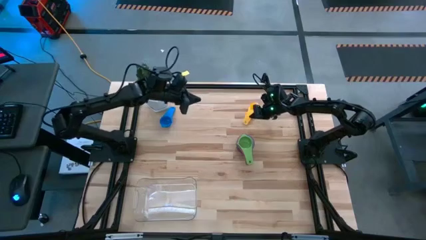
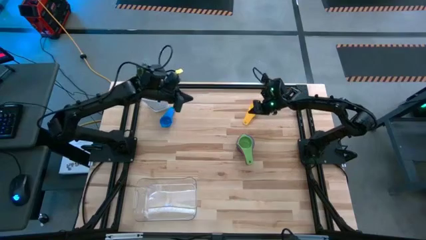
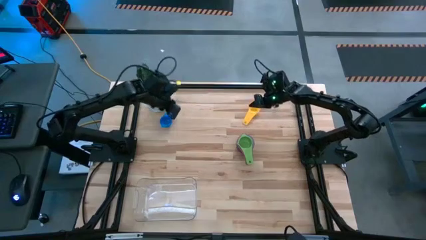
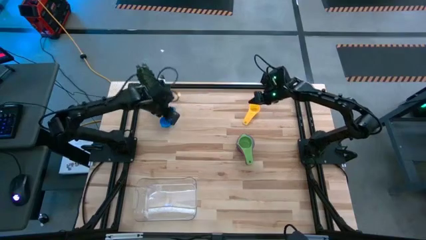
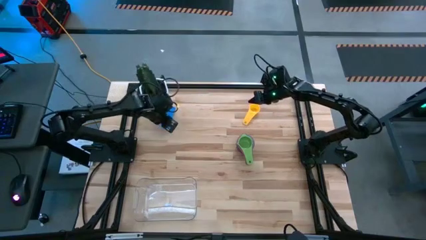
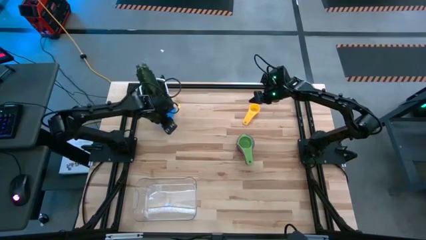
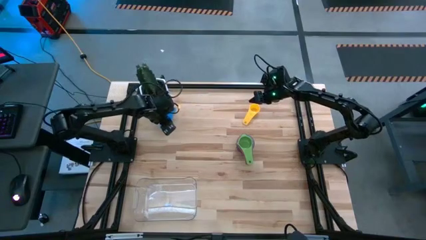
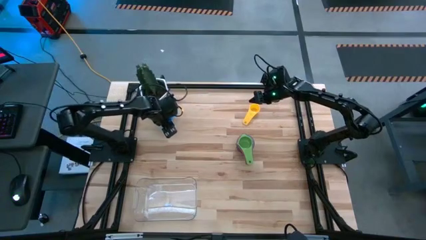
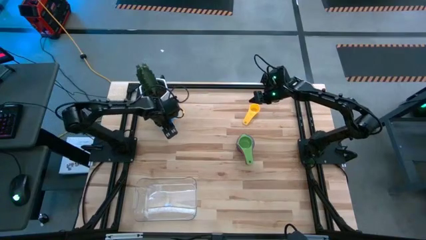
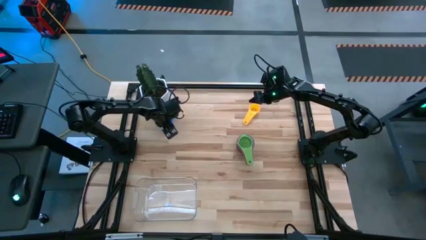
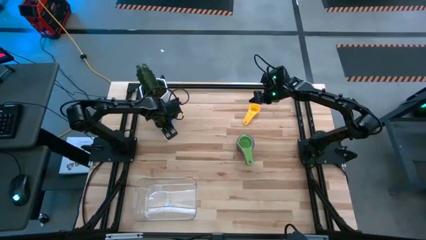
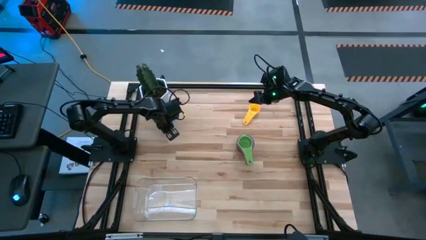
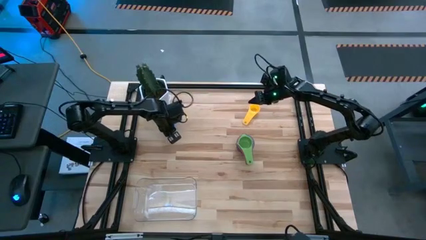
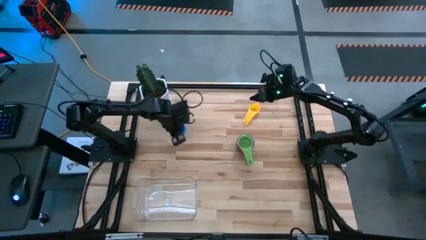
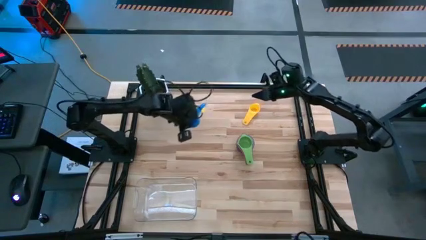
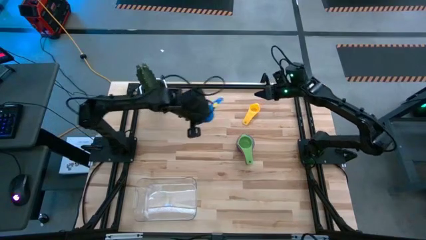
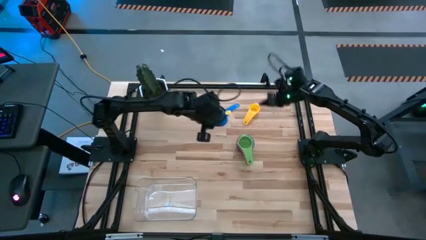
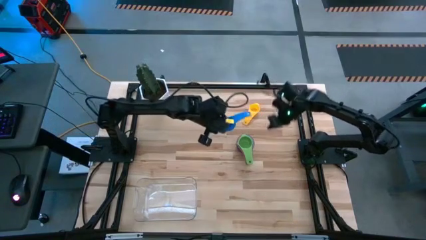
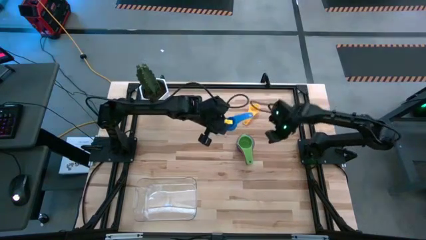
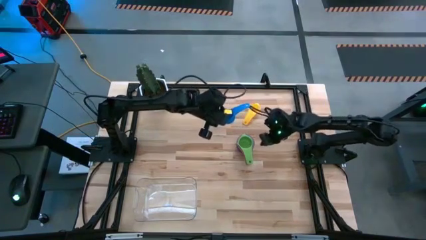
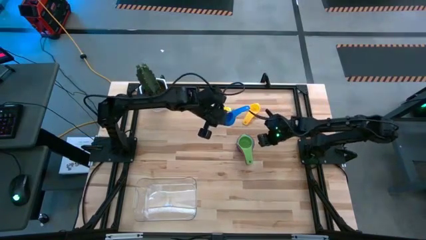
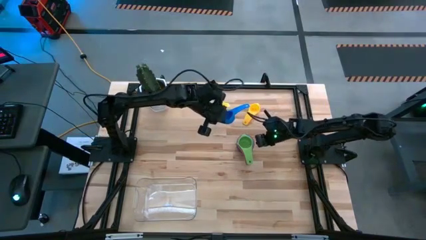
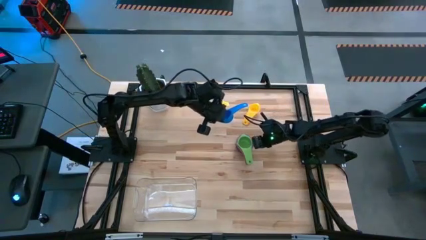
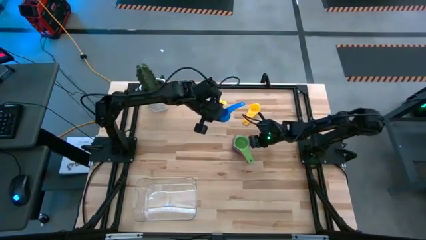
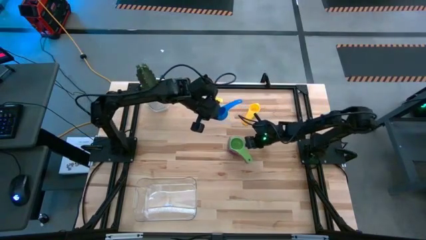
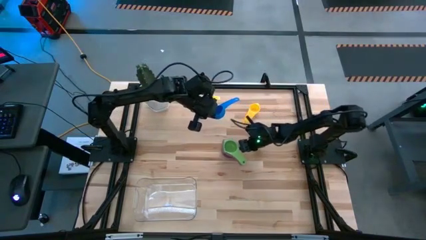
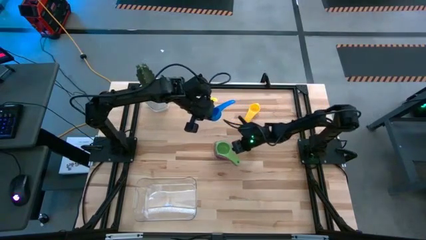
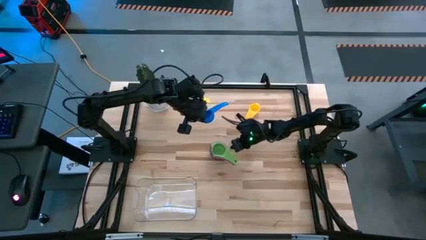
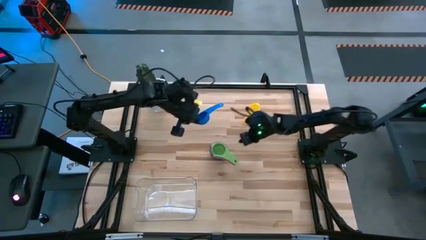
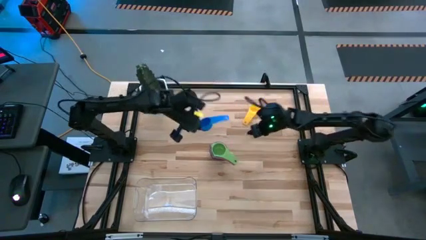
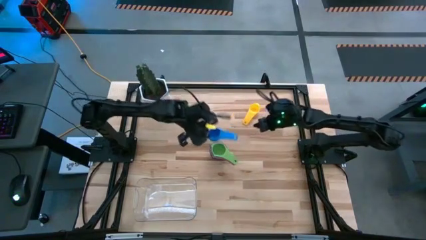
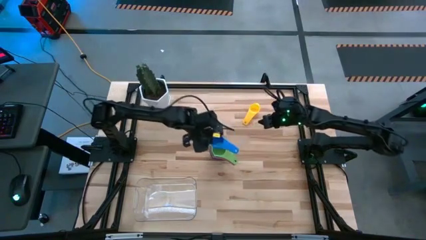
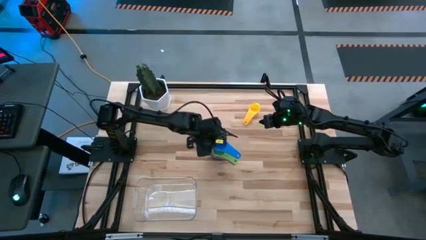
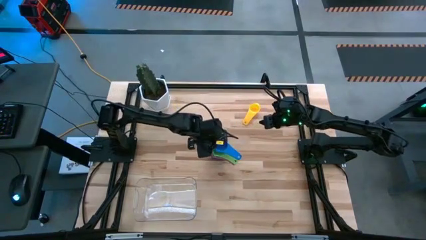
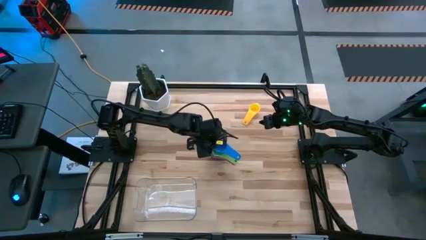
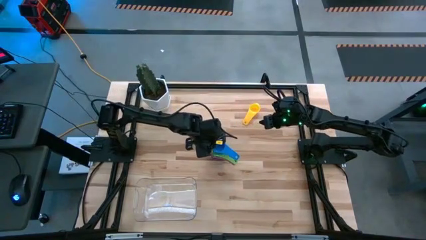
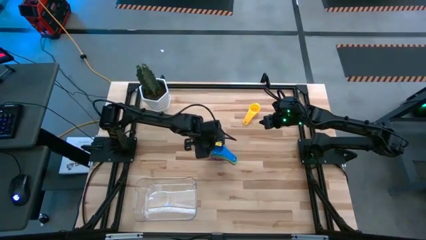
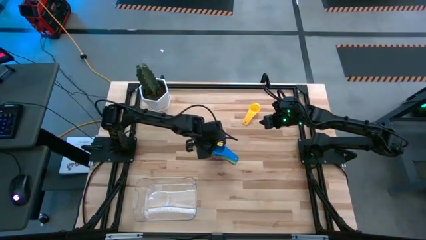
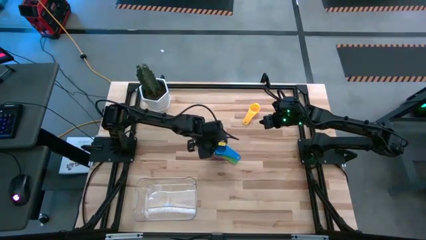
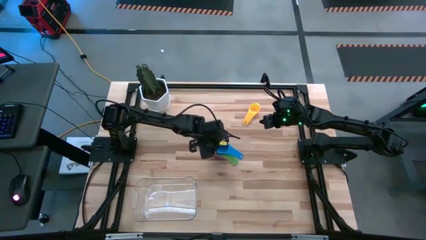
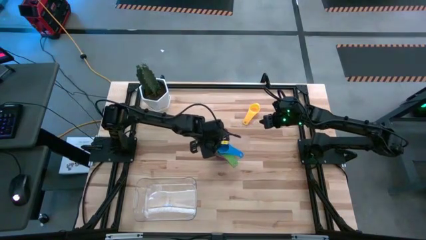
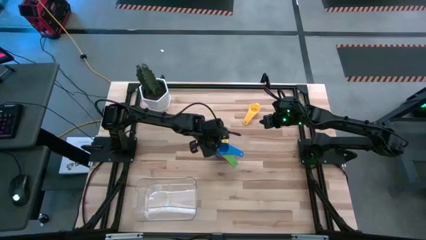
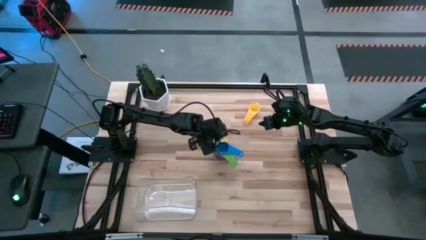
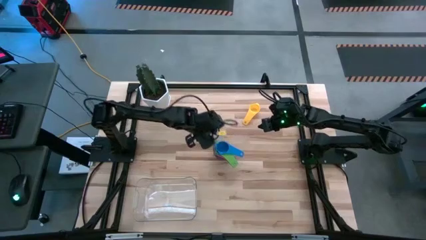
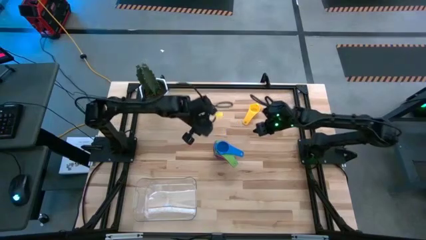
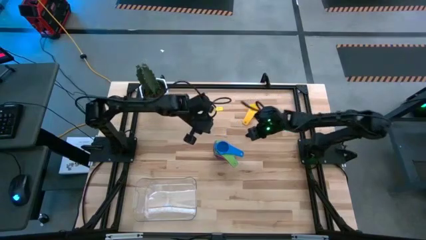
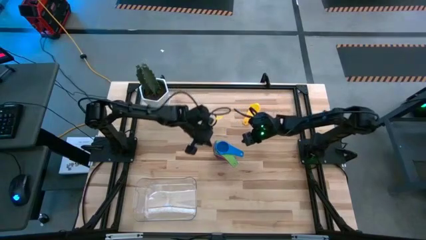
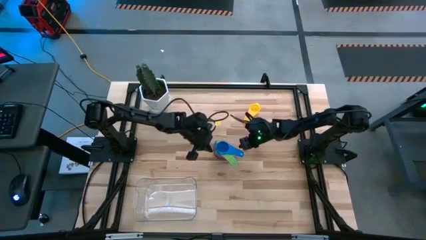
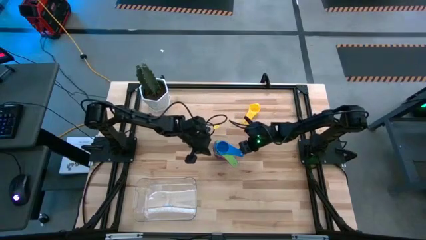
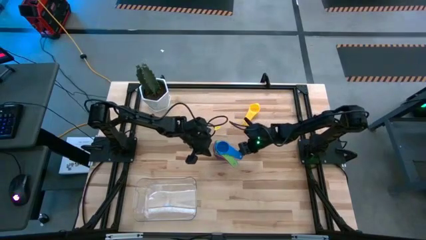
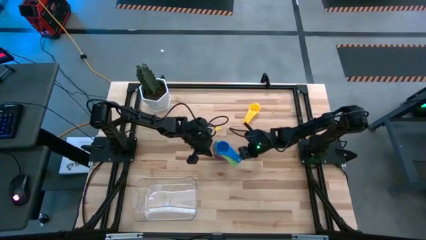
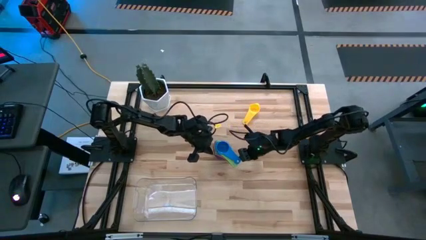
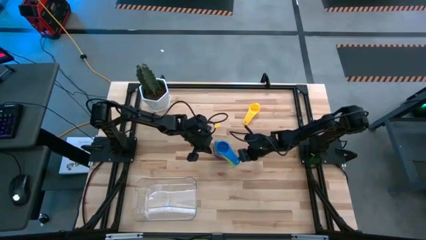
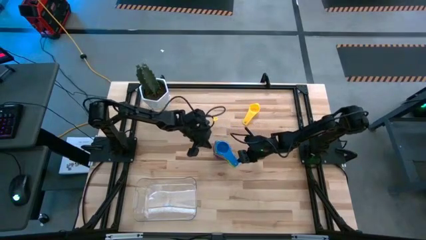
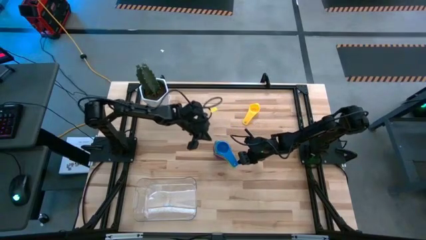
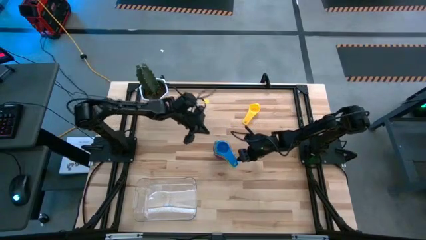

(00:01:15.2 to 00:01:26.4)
Task: Nest measuring cups in basket
Stack the blue measuring cup on top of the green measuring cup

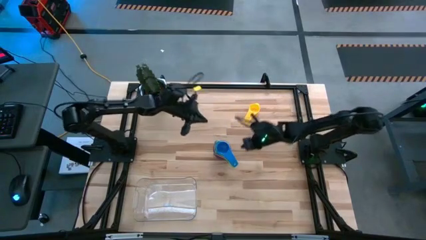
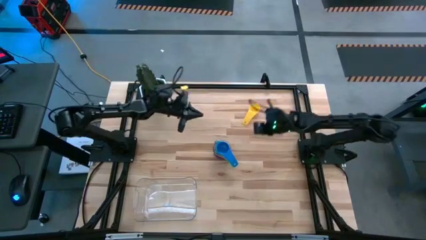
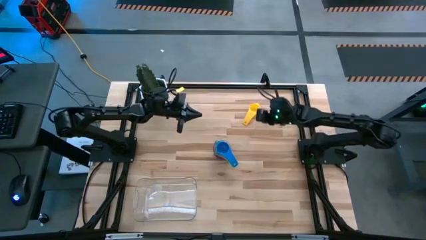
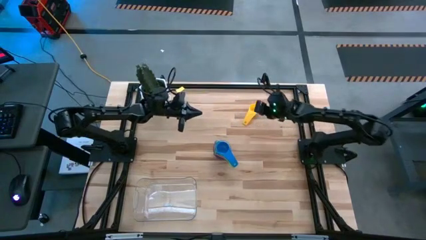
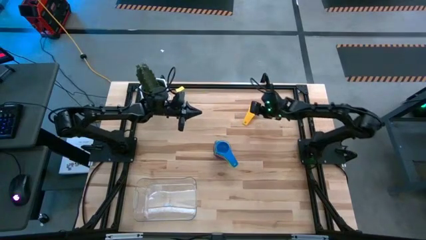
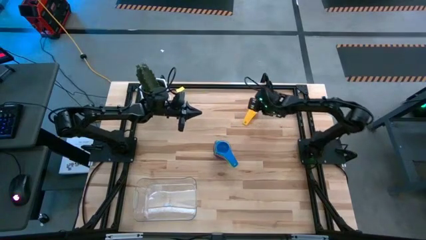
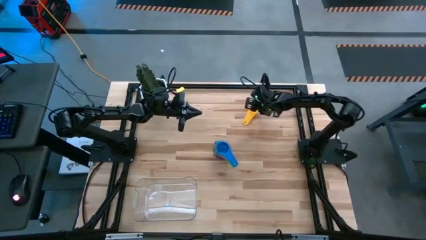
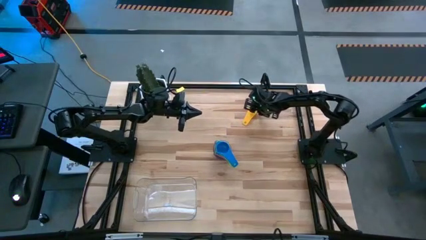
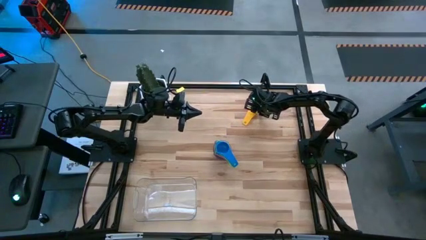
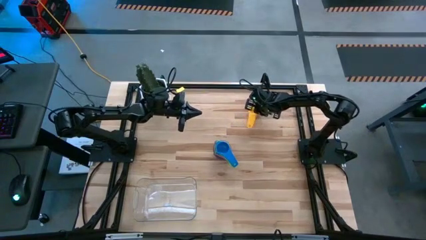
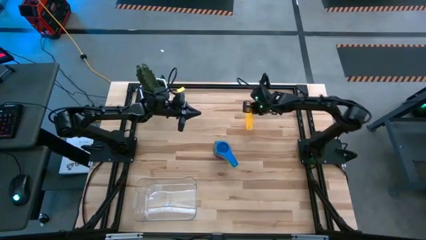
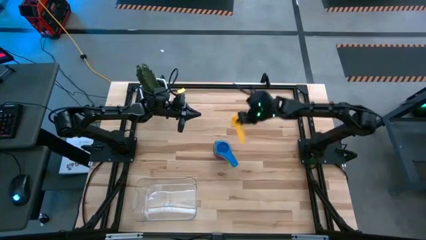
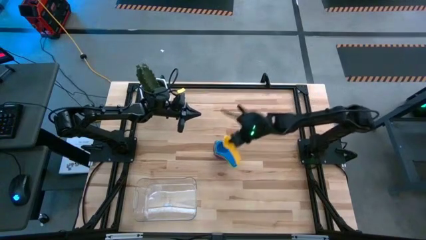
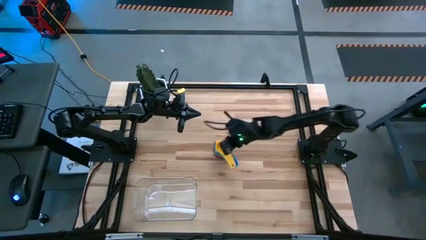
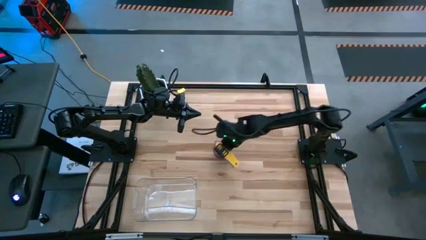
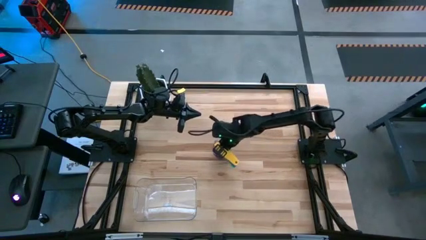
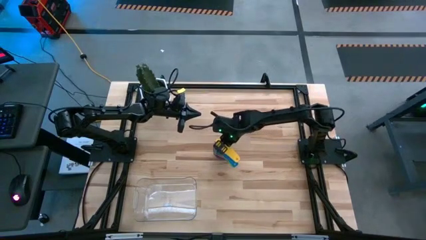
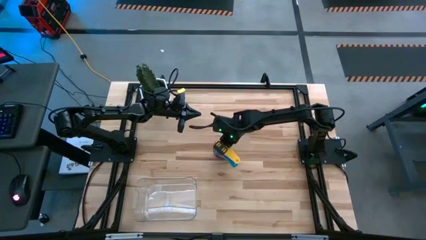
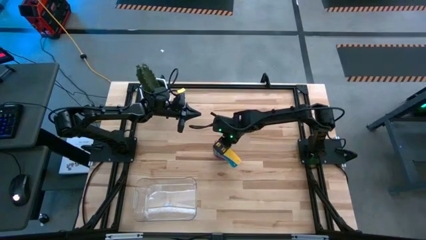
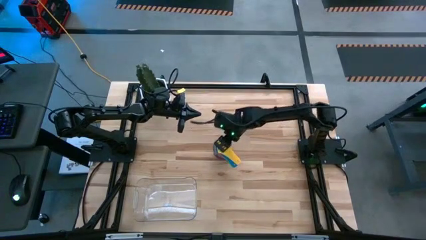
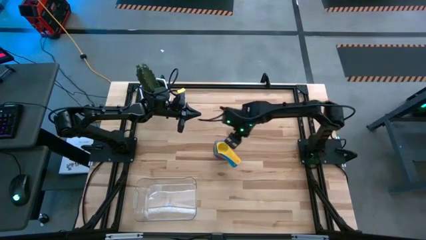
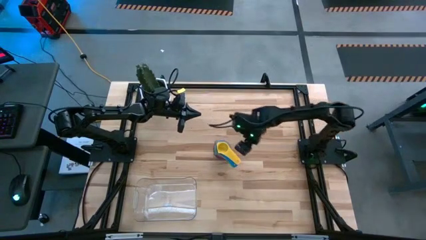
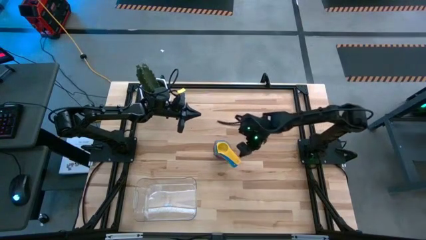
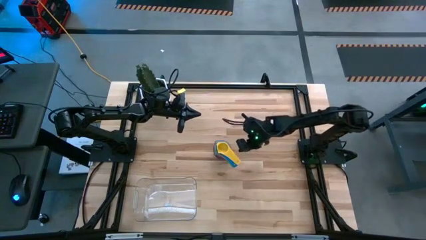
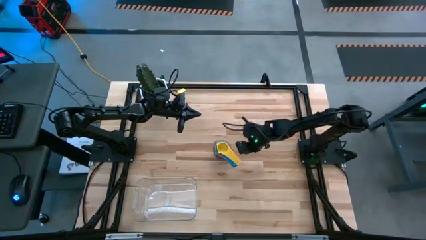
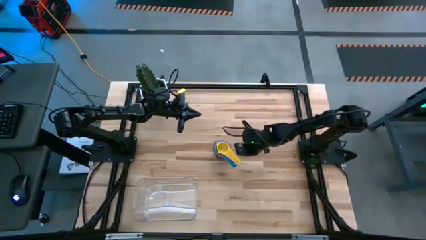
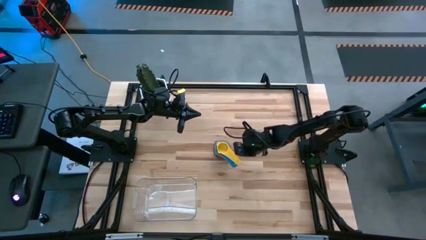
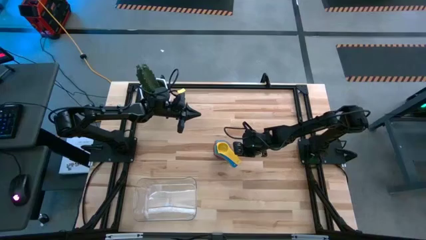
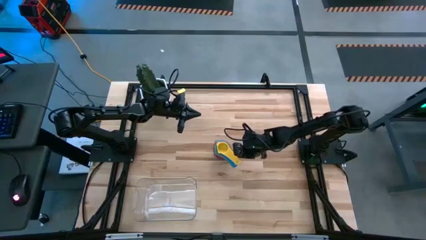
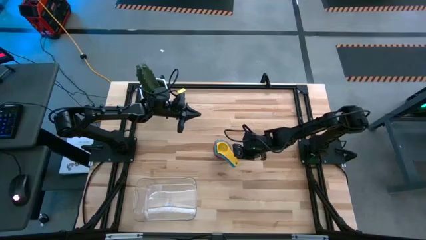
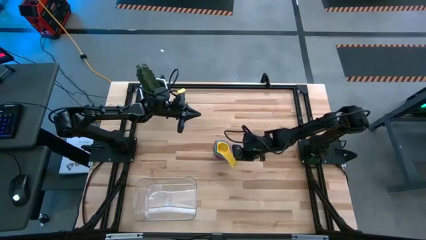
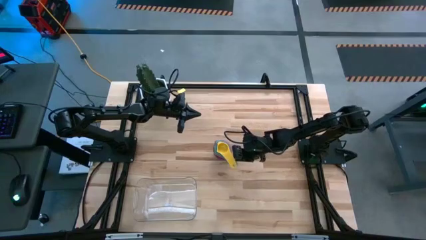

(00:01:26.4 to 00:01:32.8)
Stack the yellow measuring cup on top of the green measuring cup
